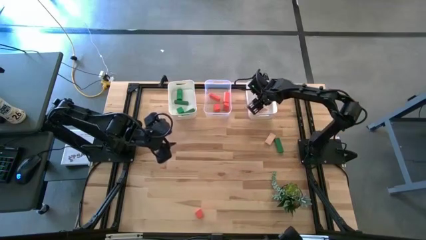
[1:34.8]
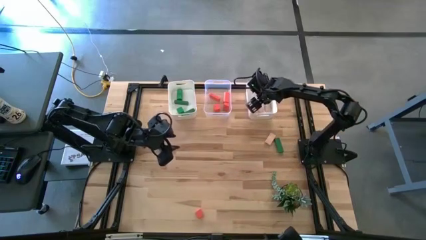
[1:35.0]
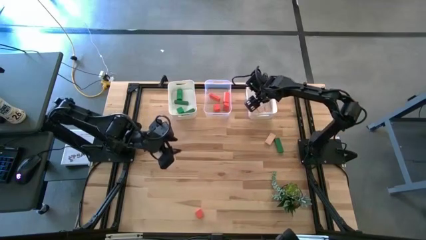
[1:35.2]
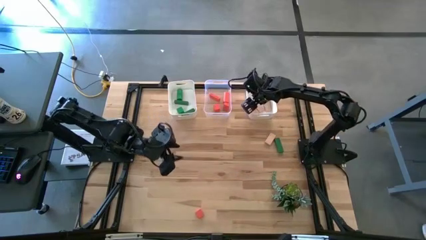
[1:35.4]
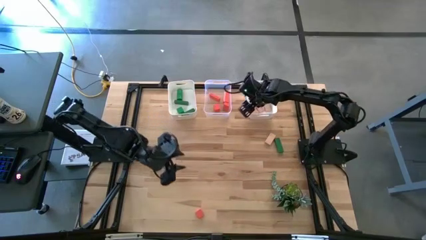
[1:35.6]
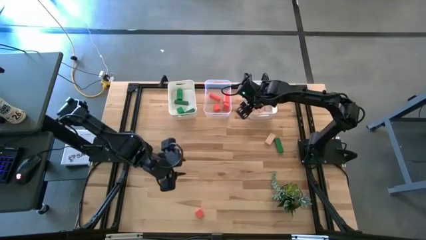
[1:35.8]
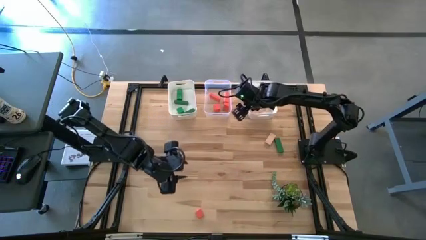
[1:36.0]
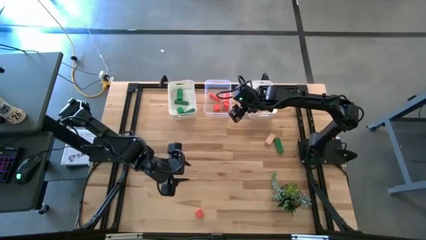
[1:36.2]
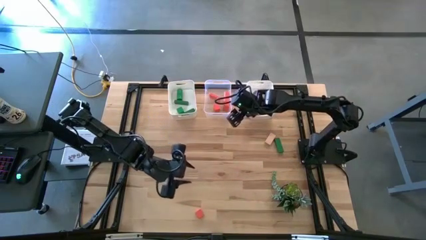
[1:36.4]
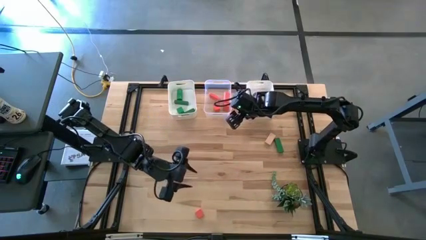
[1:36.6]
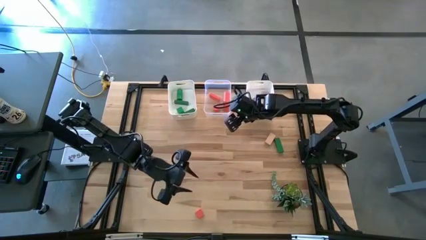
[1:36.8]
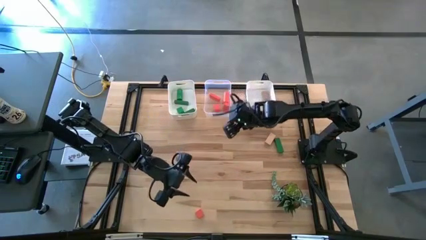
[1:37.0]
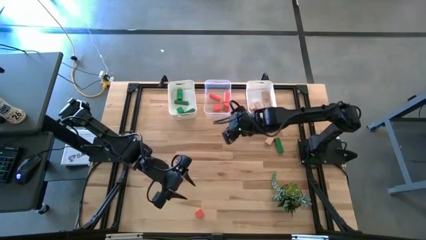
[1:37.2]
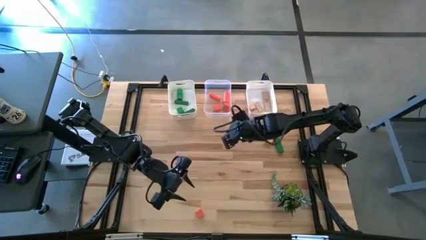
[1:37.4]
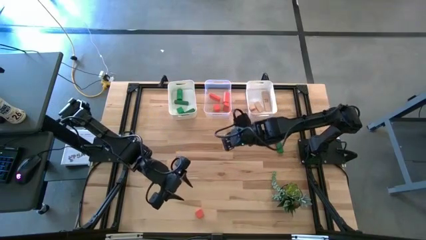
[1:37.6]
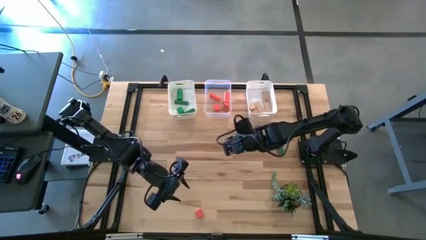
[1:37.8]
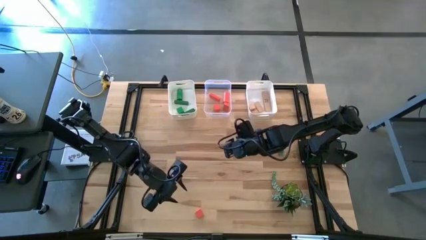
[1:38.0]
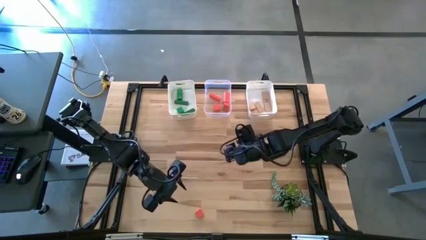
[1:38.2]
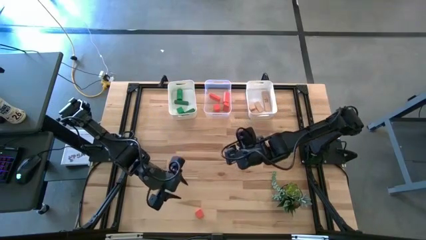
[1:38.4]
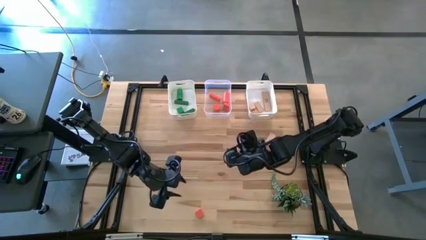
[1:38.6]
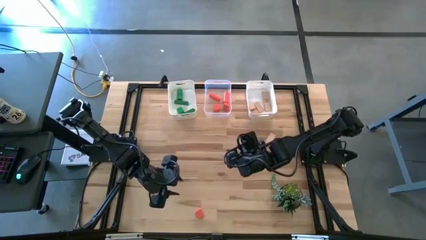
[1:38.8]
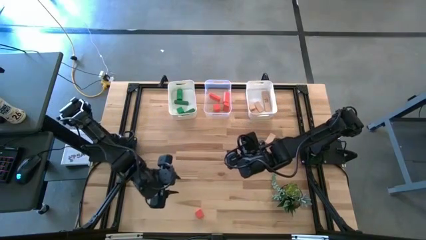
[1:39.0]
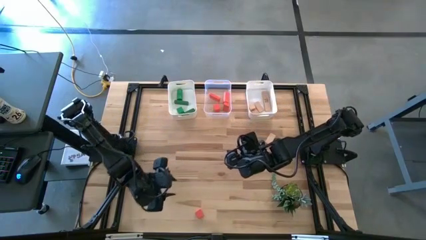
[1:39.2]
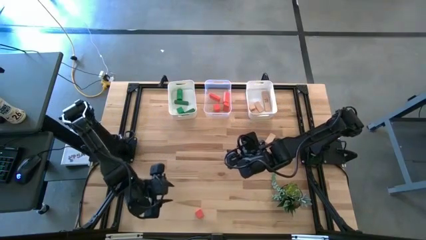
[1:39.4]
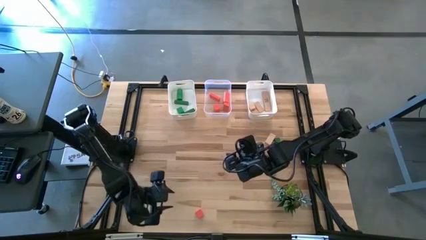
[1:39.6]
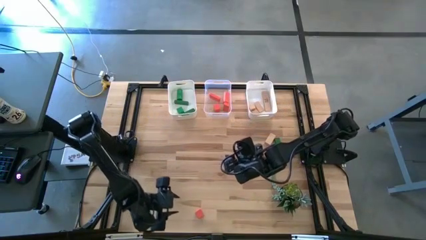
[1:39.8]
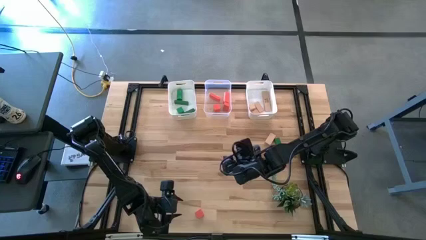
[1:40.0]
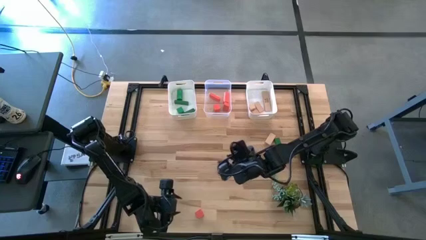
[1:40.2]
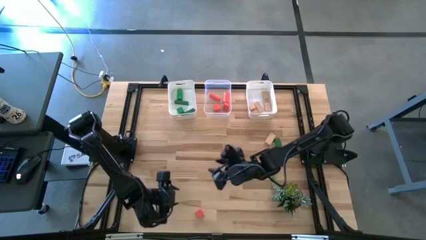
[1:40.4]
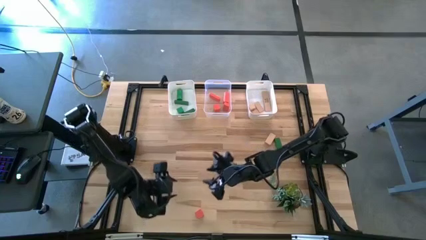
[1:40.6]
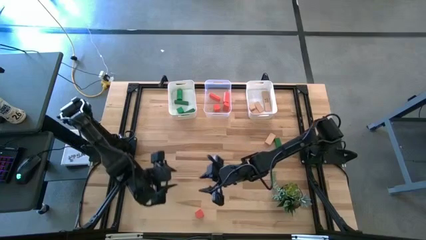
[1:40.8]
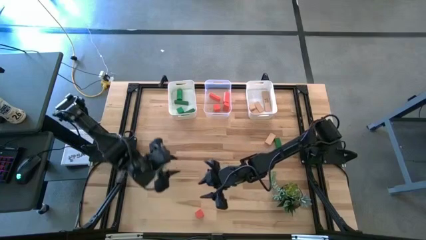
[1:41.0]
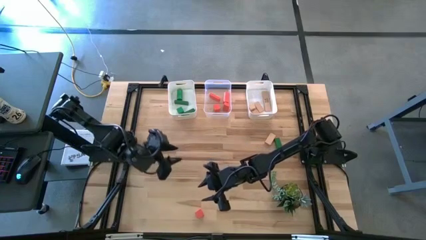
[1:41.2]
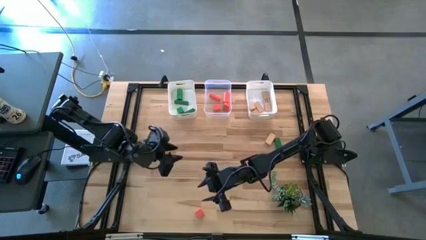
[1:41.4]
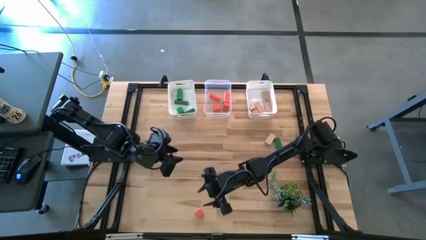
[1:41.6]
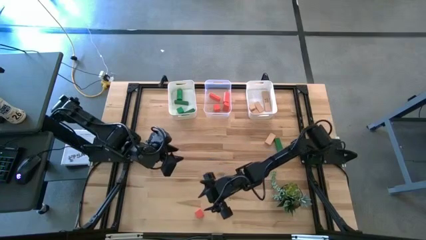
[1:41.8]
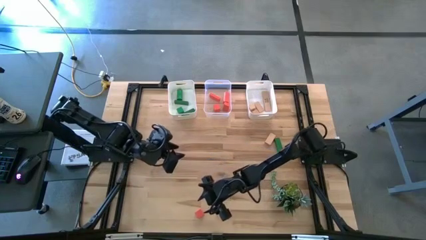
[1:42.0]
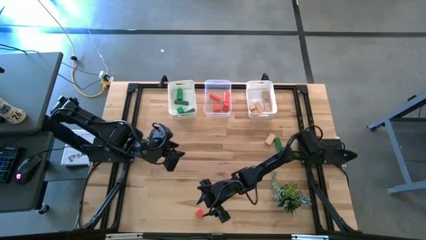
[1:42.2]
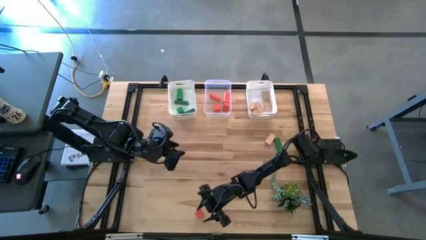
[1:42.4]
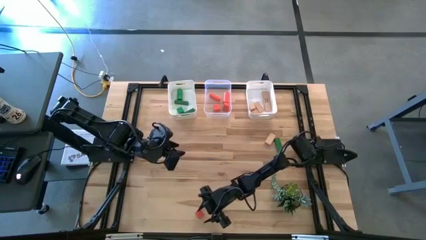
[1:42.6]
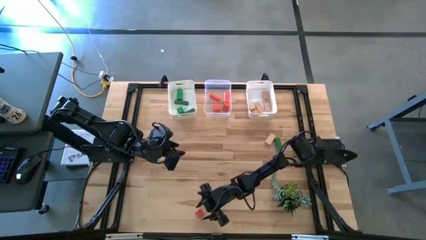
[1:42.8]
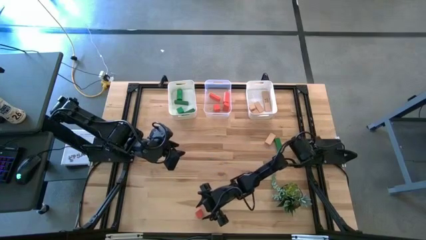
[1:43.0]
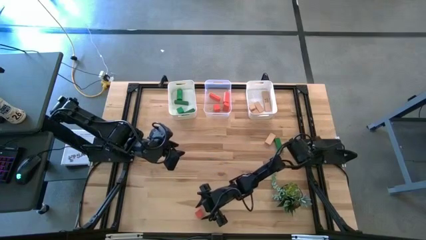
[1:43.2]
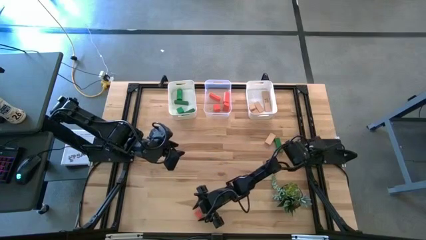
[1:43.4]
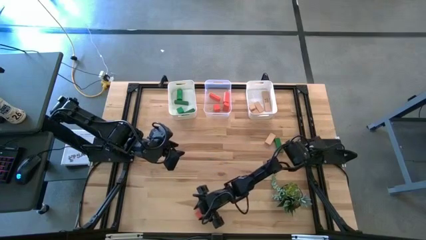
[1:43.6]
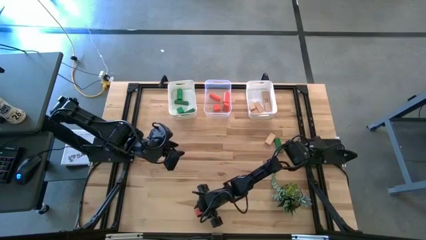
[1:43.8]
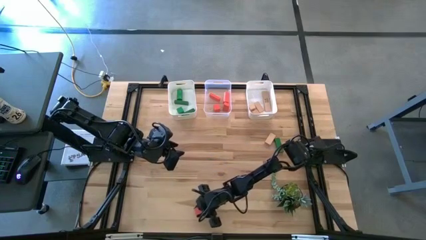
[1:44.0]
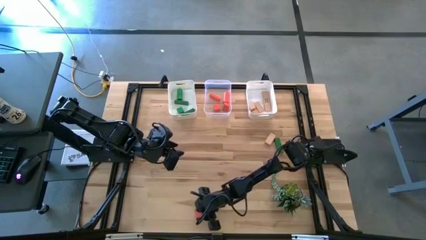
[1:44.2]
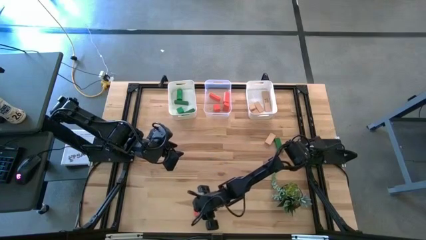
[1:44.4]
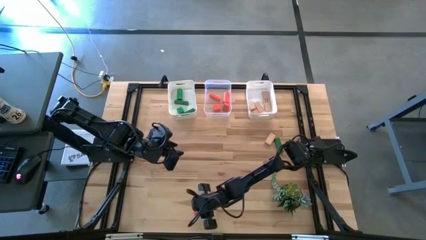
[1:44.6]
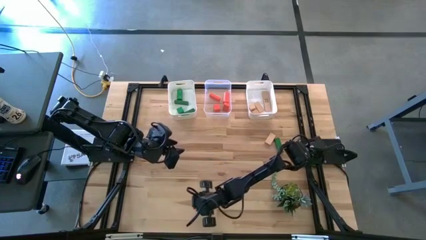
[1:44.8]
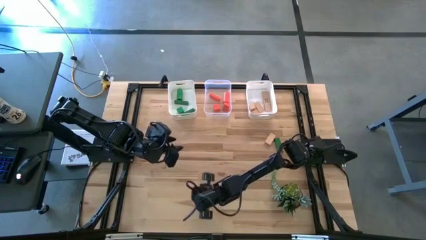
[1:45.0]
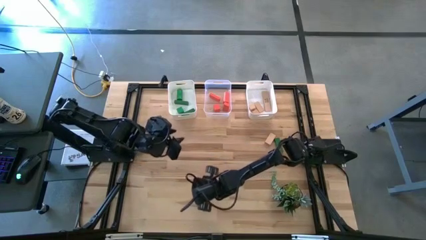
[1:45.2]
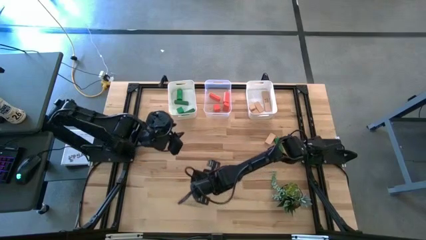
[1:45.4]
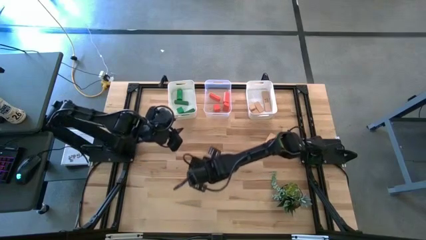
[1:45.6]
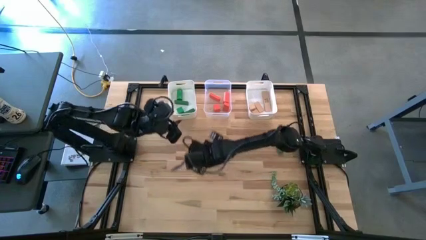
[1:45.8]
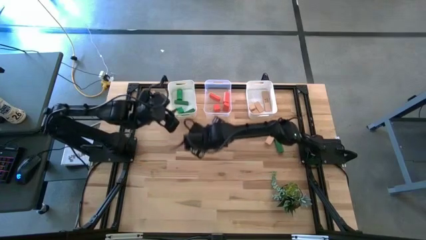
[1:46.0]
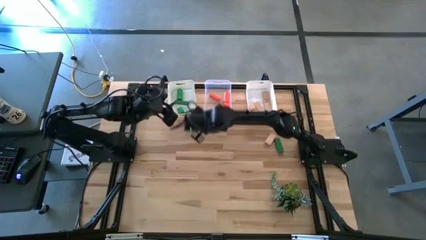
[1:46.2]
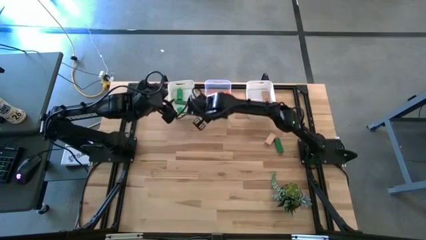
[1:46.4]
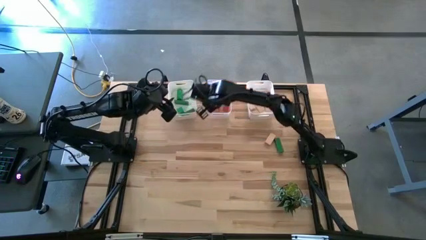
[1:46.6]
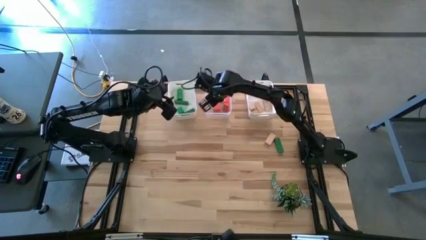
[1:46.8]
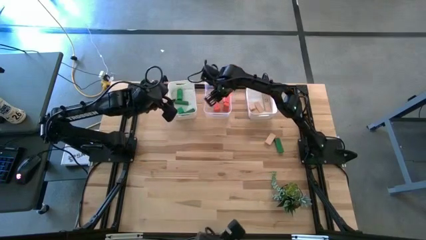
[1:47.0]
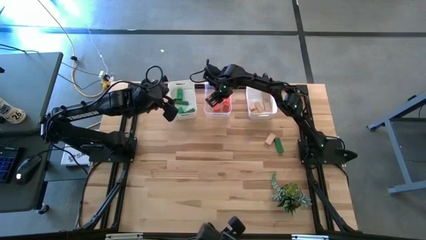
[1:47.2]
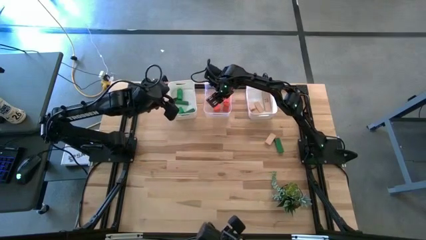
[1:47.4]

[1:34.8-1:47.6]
Task: Sort & place blocks by color
Put the orange block into the transparent bin
